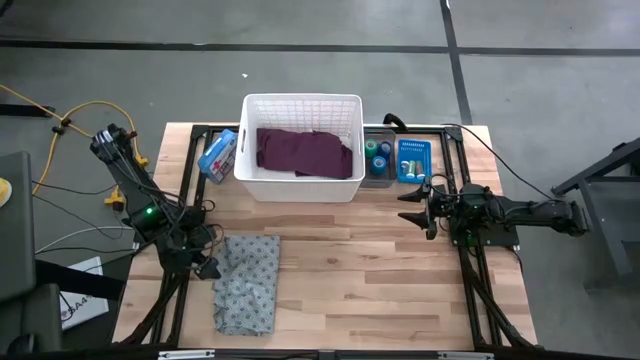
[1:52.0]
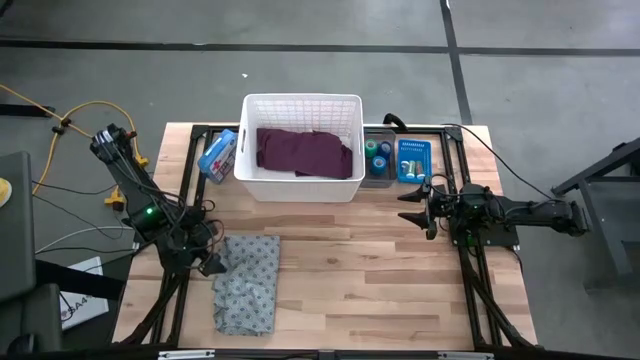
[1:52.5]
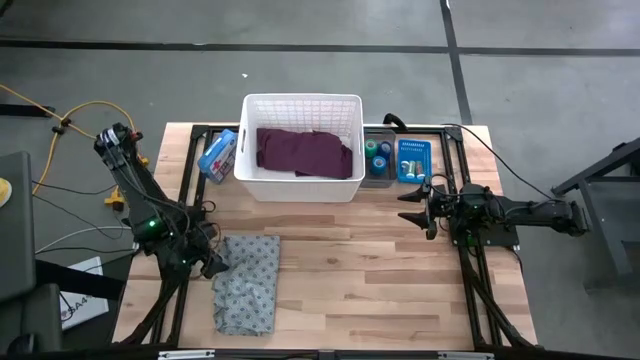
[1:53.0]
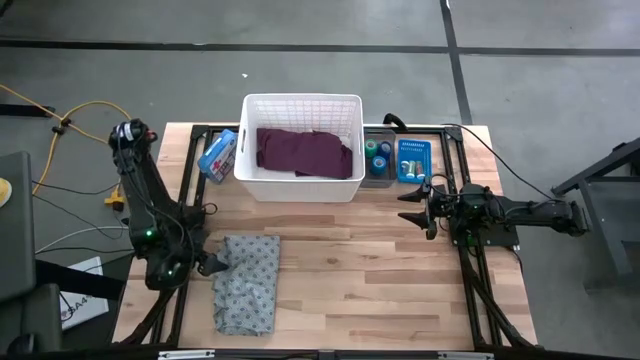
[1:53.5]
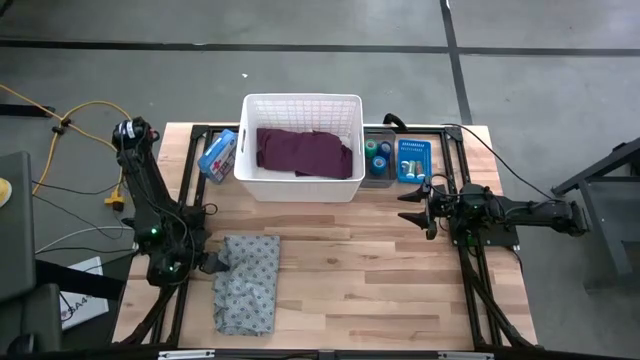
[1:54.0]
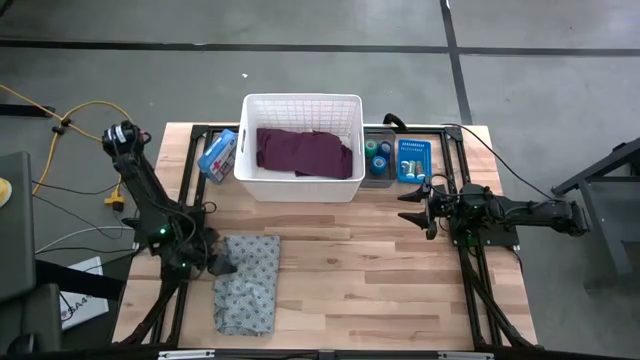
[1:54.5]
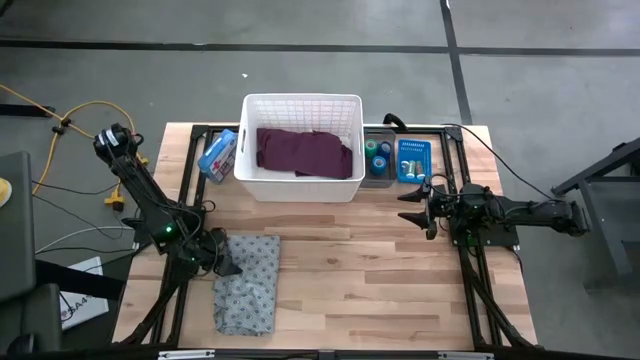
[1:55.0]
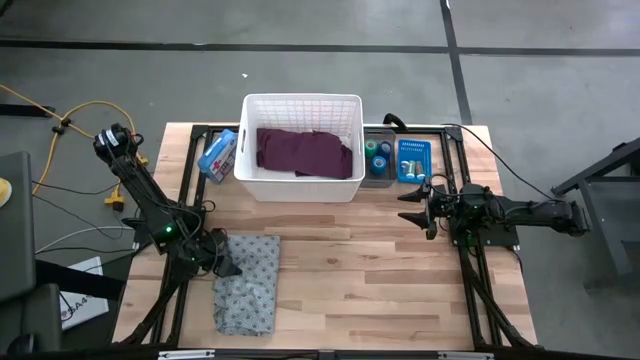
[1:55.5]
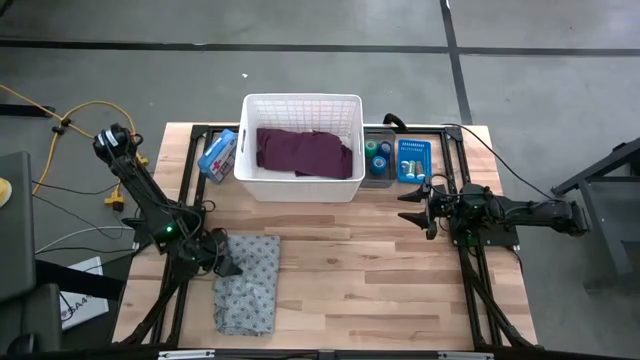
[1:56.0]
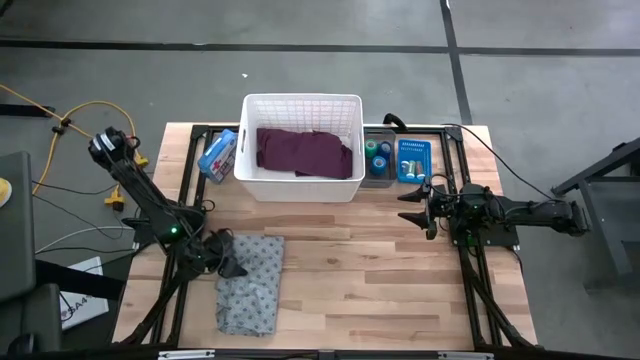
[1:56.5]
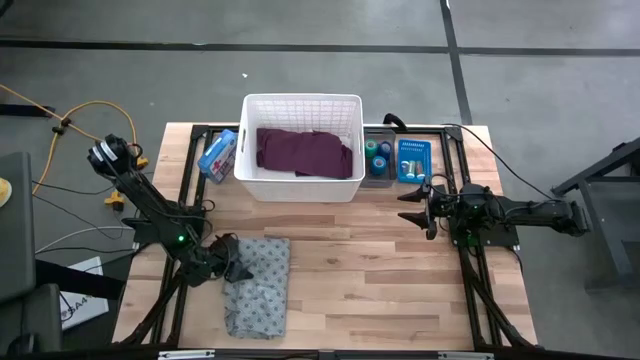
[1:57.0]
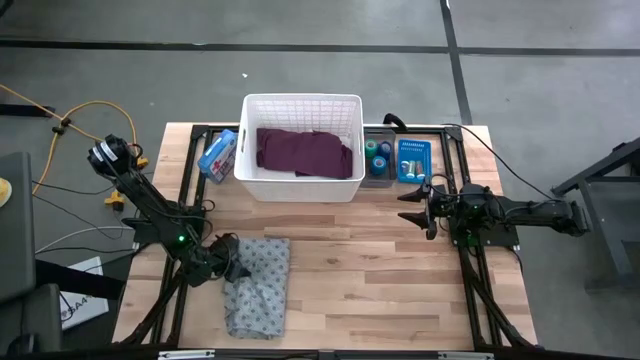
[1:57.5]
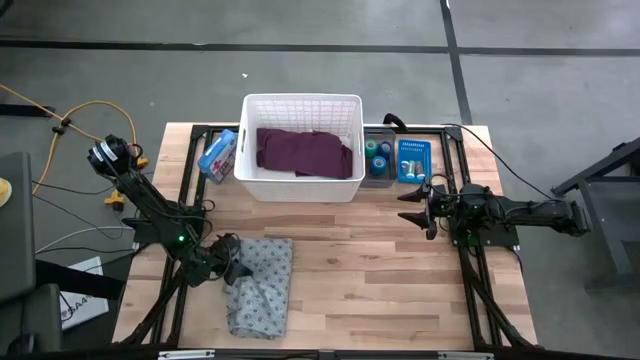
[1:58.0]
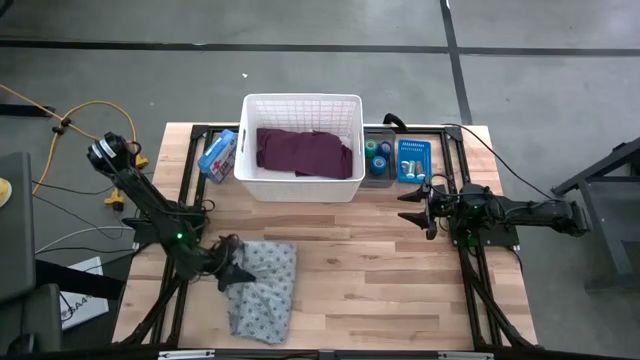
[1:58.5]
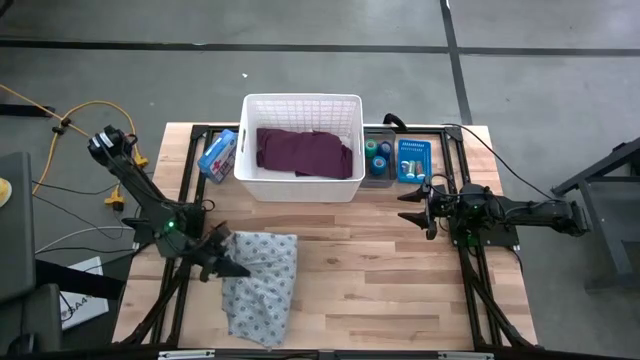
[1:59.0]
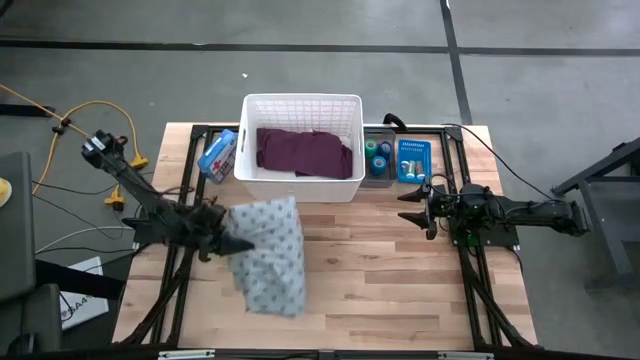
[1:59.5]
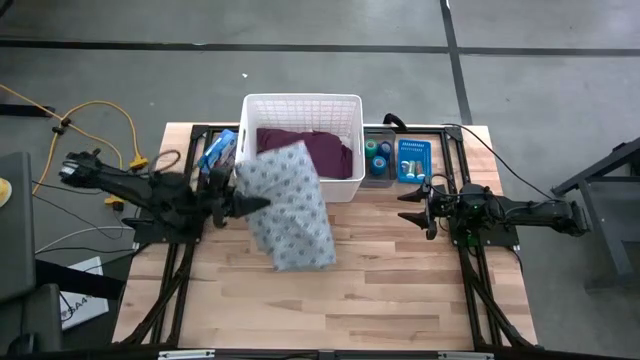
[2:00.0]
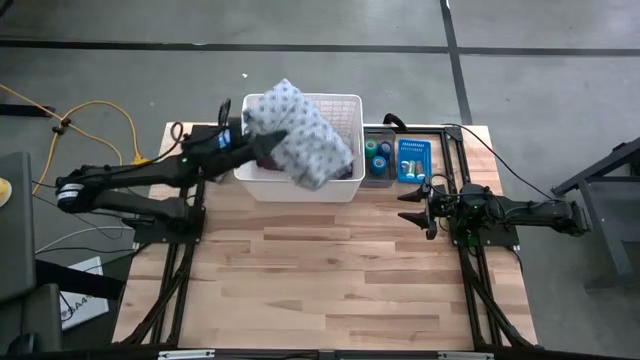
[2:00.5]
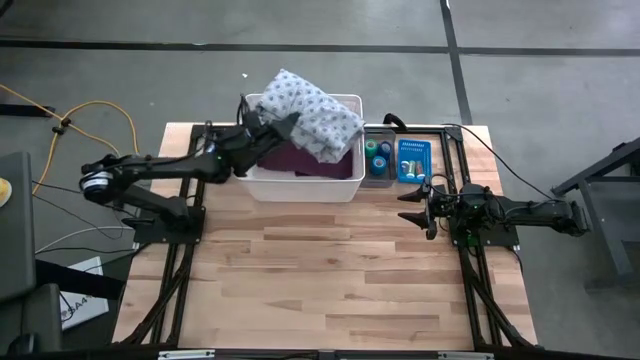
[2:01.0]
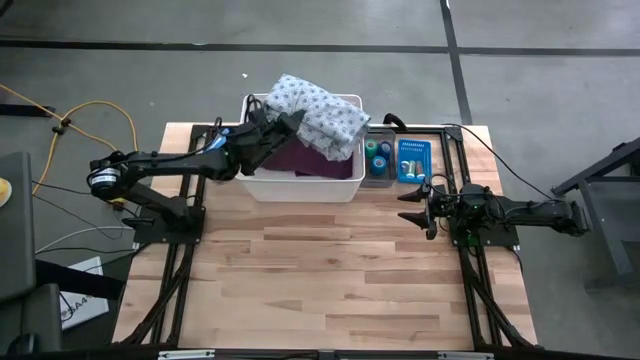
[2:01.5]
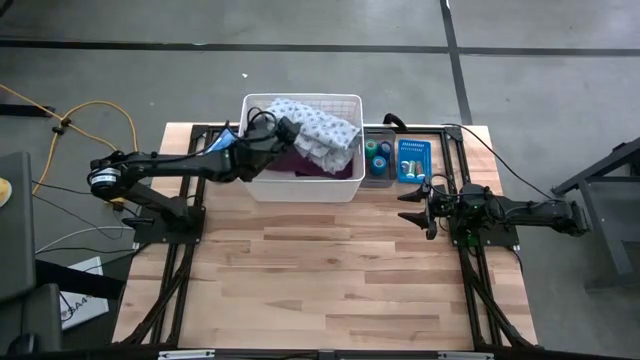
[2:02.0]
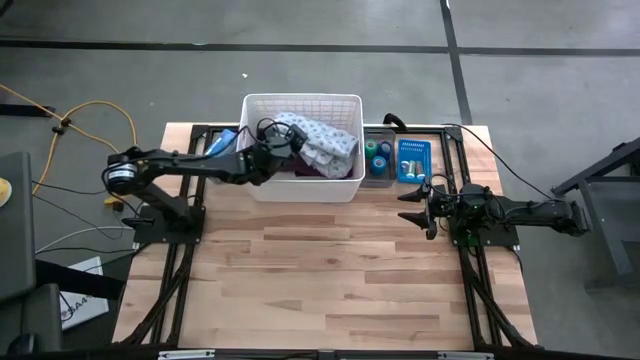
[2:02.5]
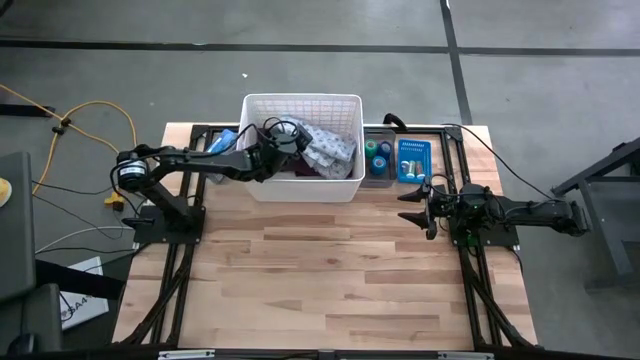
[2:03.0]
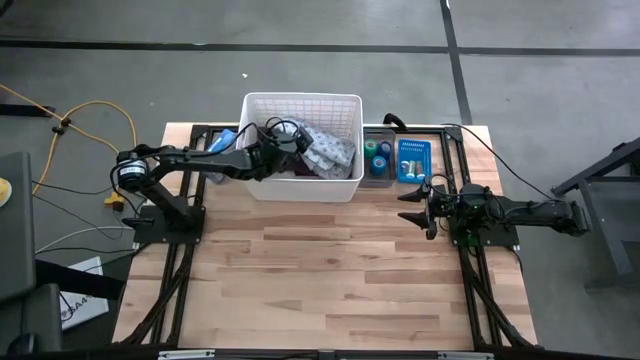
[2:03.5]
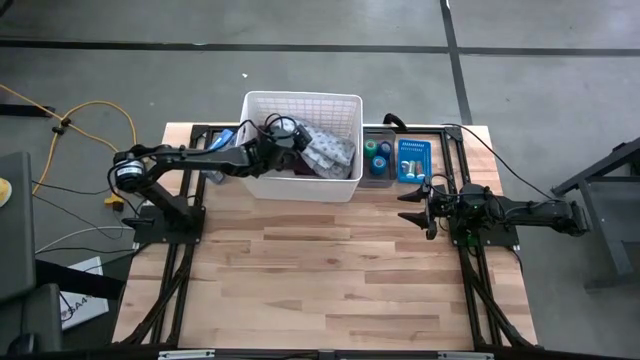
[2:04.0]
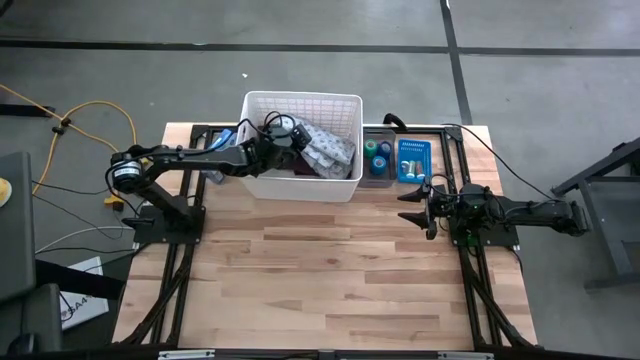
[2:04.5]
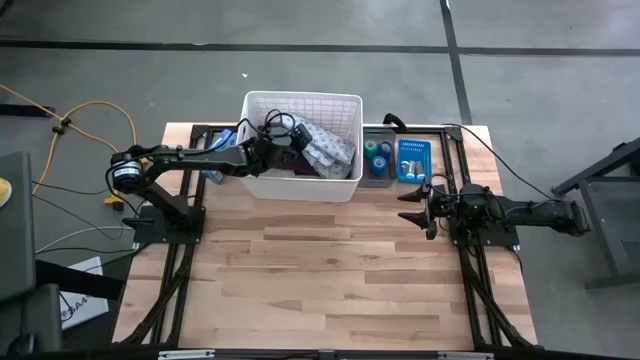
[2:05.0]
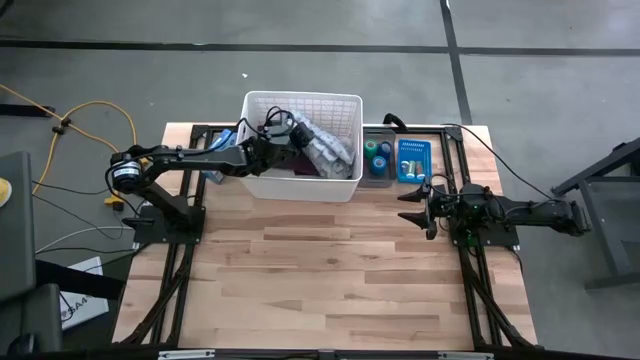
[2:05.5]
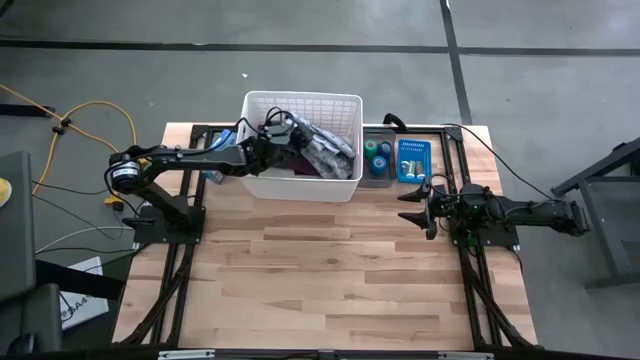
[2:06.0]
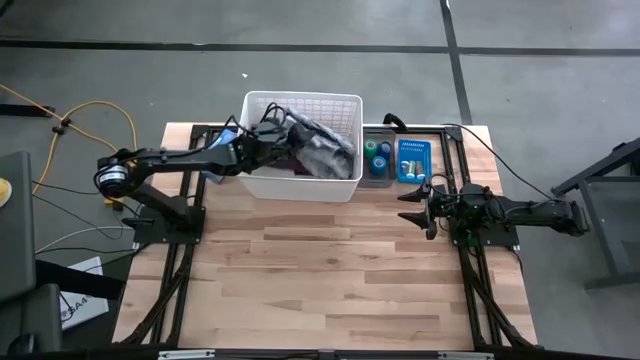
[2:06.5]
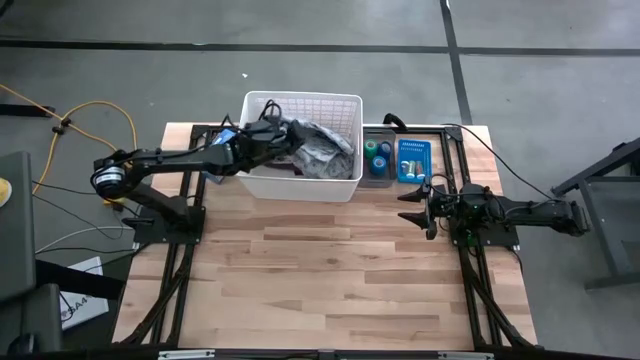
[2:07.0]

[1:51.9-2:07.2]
Task: Pick & Place Medicine items
Put the gray patient gown into the white laundry bin

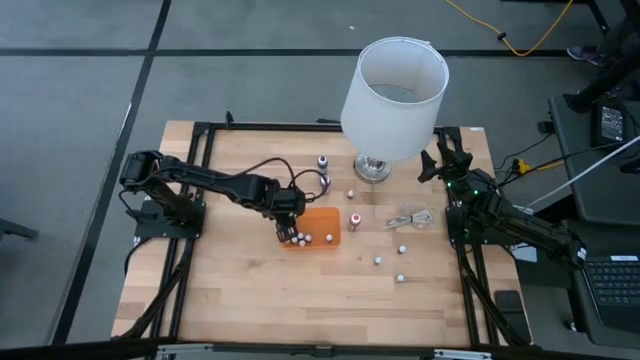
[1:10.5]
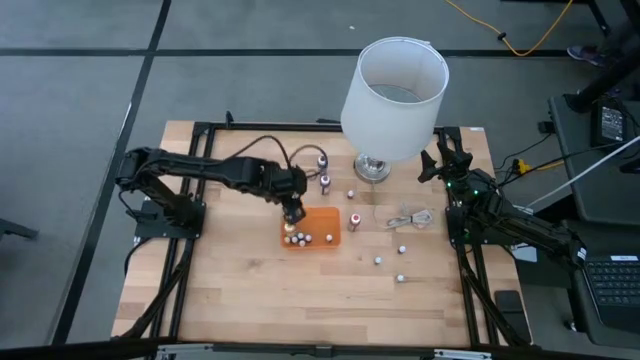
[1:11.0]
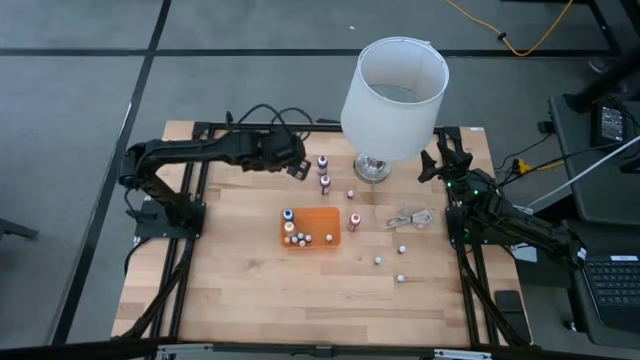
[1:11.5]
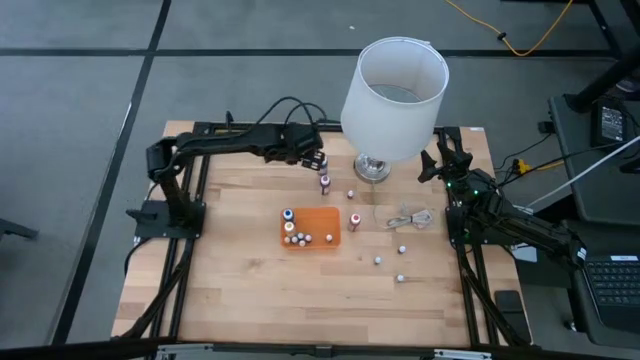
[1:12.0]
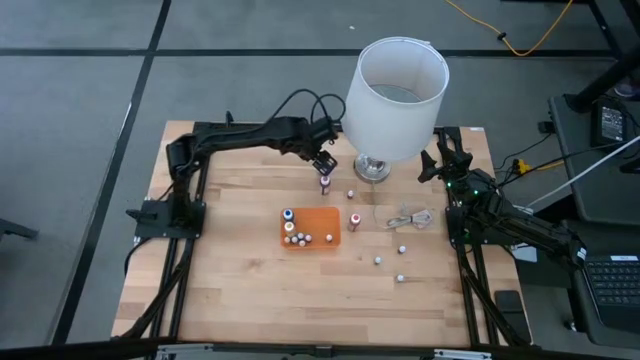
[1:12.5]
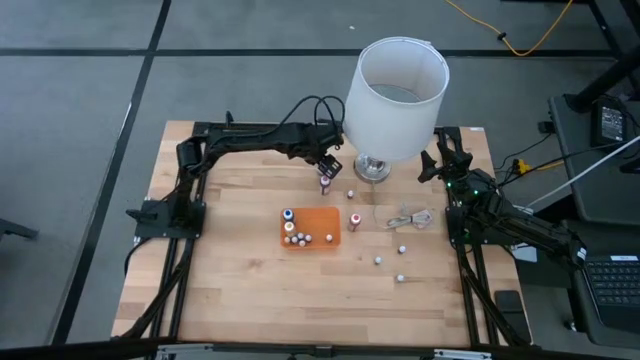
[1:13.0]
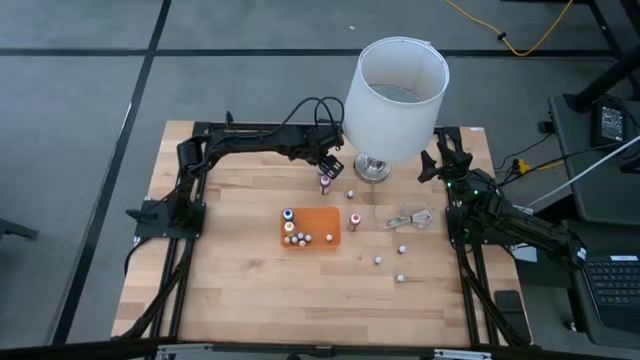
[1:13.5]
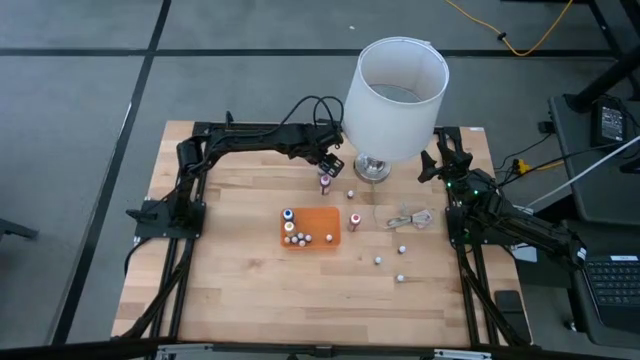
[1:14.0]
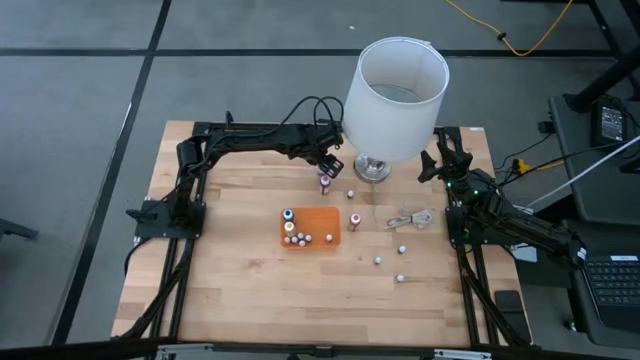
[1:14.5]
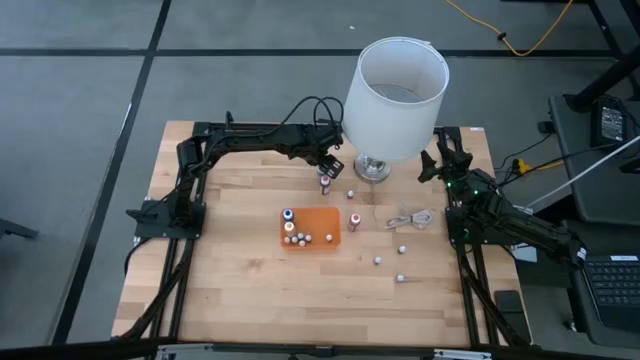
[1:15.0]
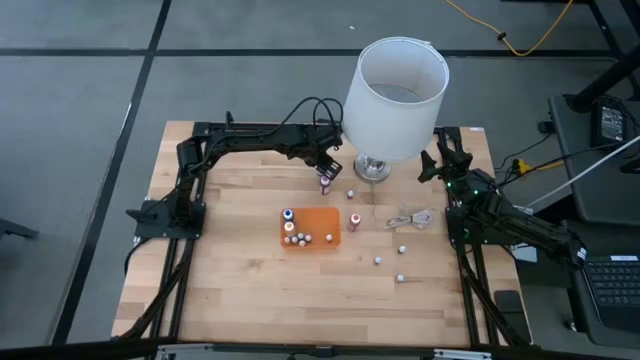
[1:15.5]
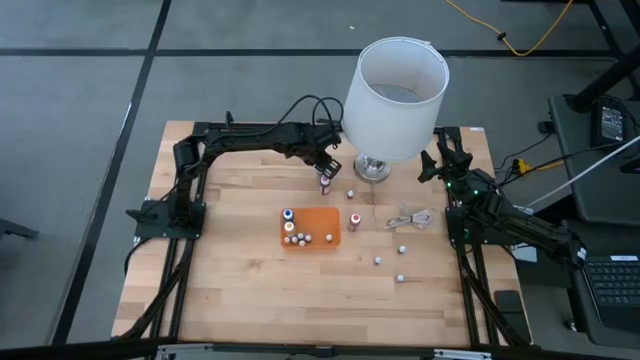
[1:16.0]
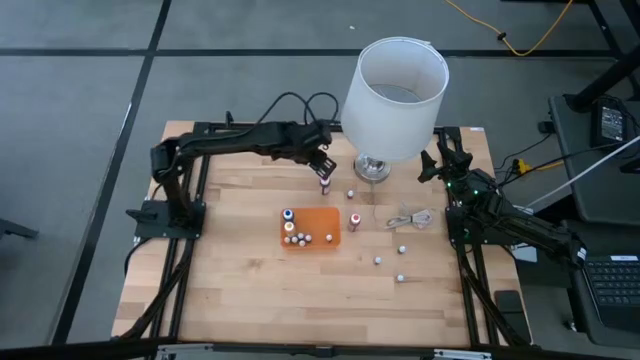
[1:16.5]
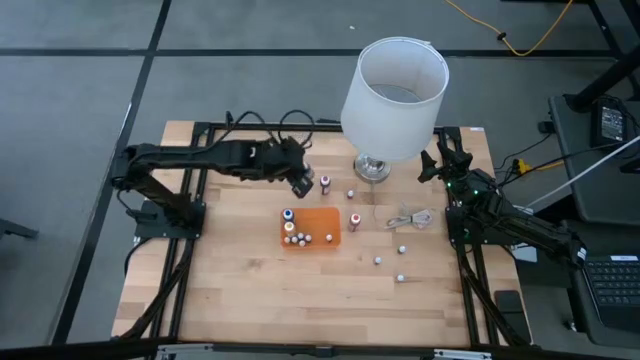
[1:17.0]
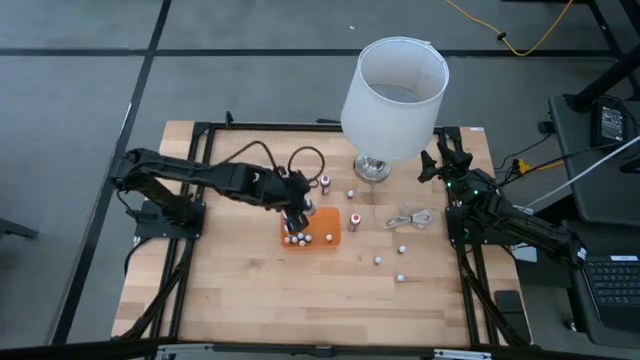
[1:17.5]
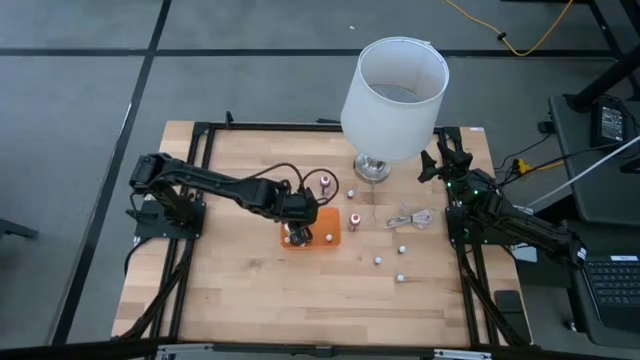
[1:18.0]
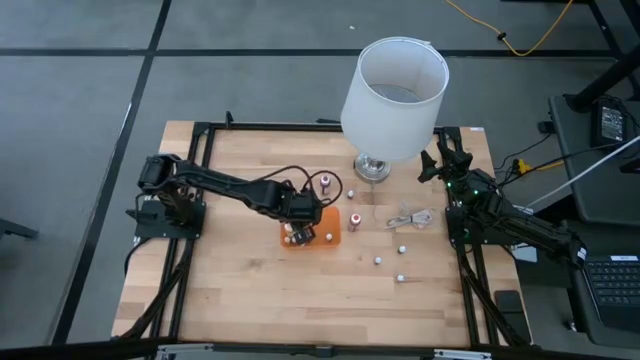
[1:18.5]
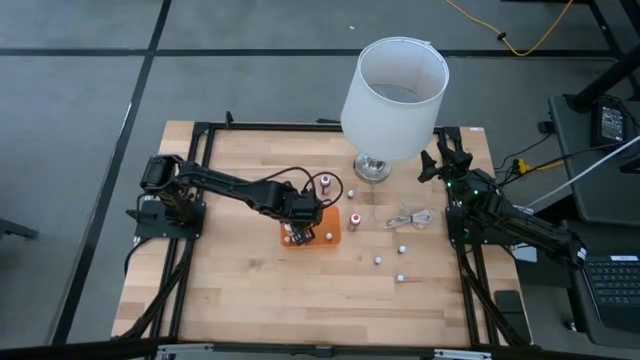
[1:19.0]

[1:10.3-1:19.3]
Task: Pick & Place food coloring
Put the big purple food coloring bottle into the orange transparent bin
